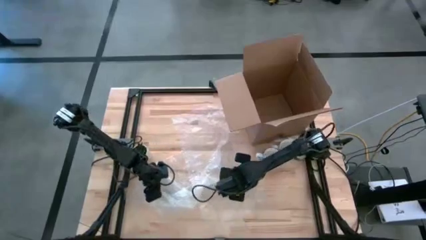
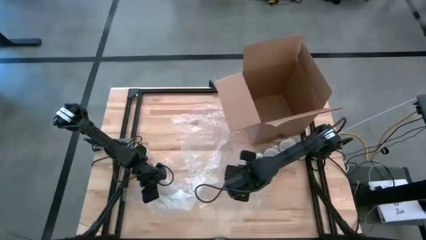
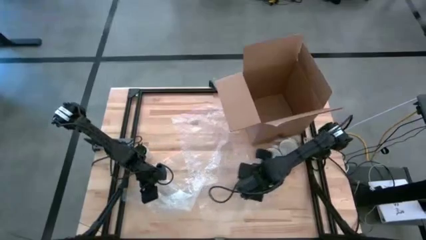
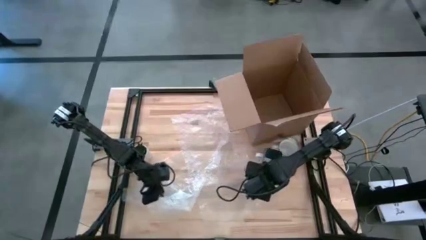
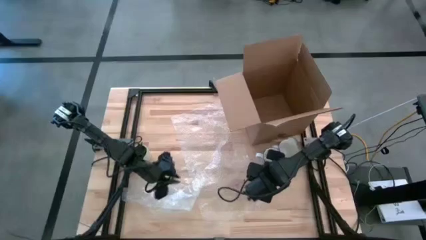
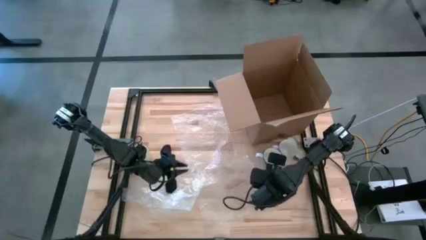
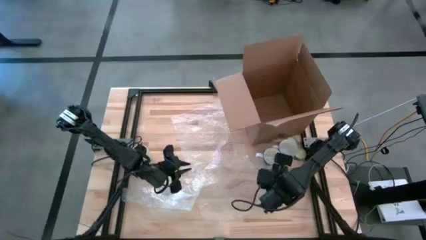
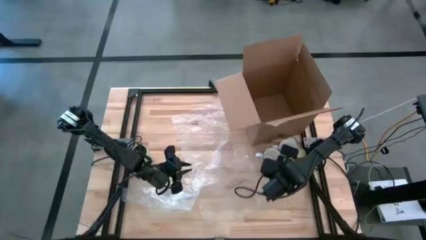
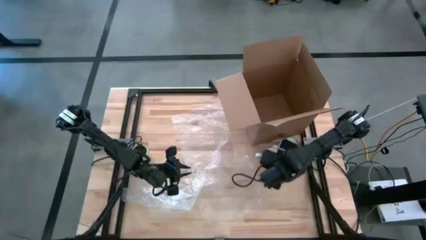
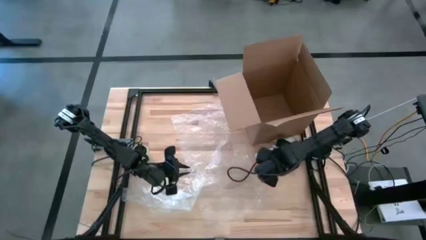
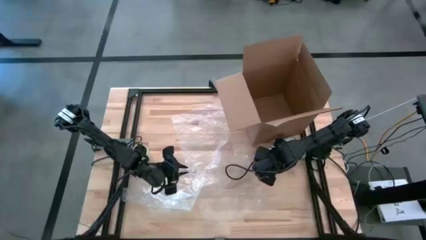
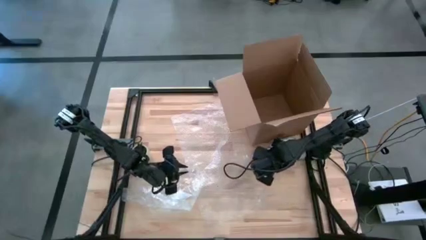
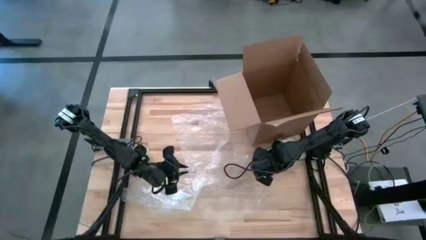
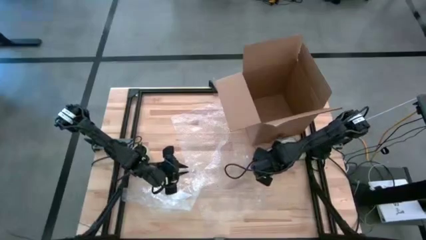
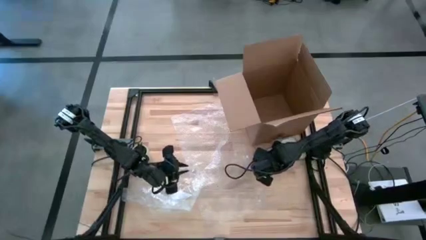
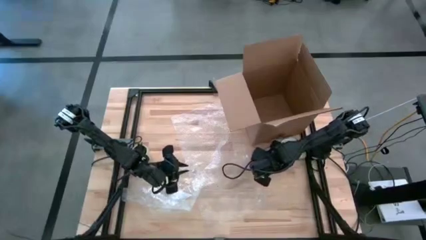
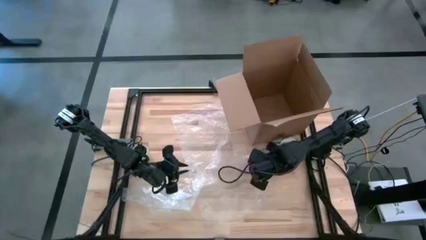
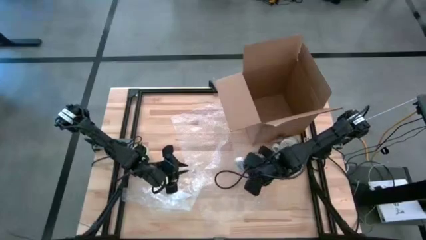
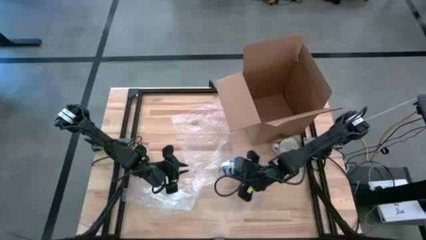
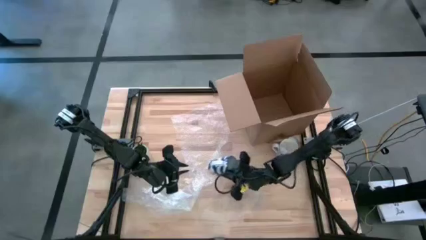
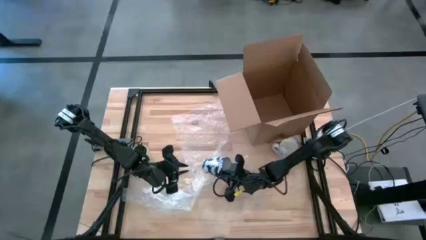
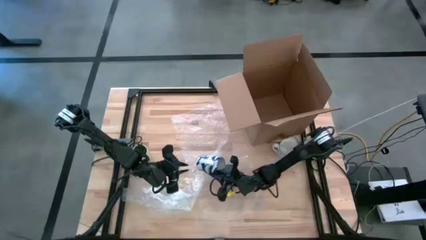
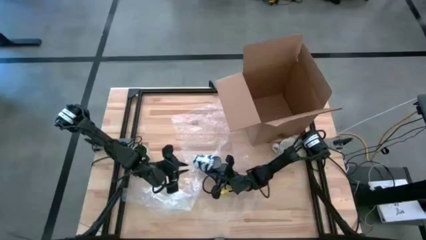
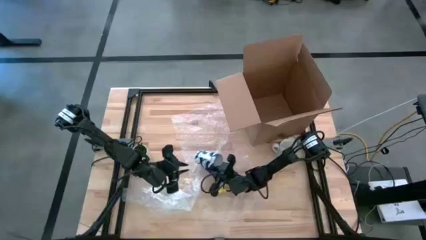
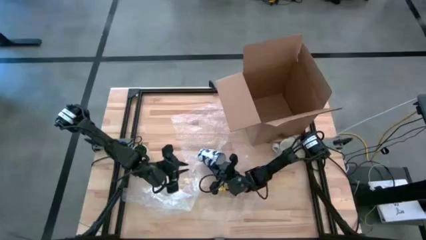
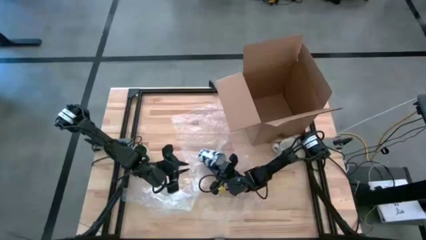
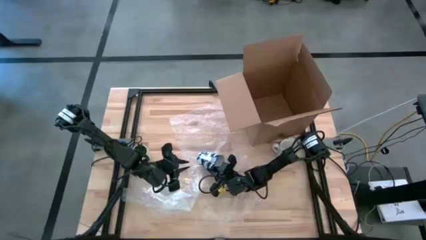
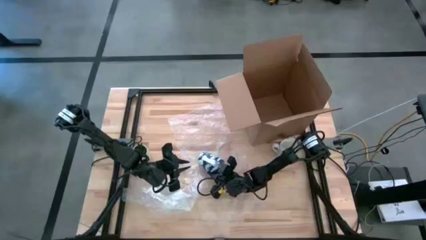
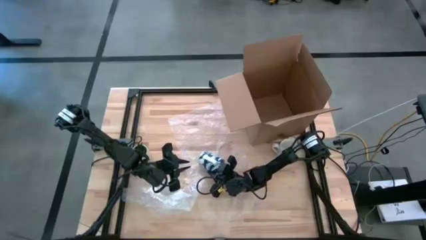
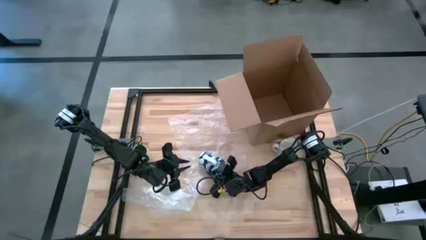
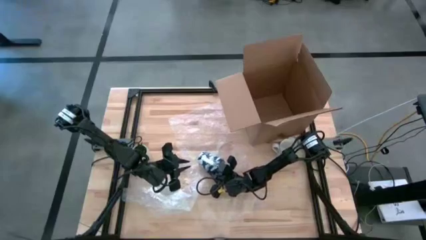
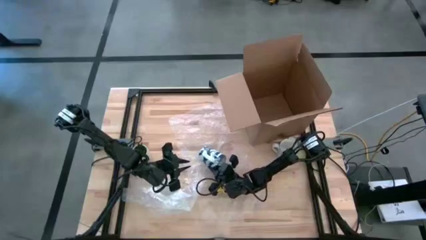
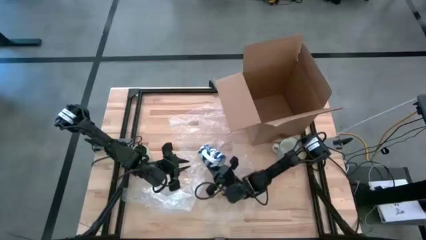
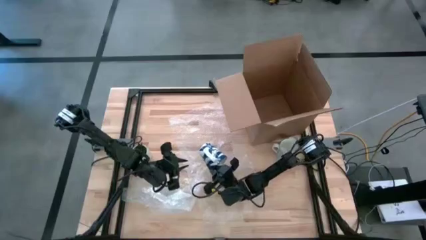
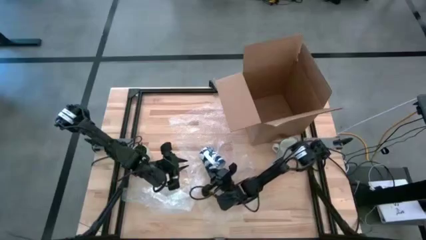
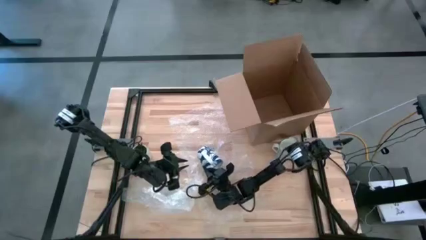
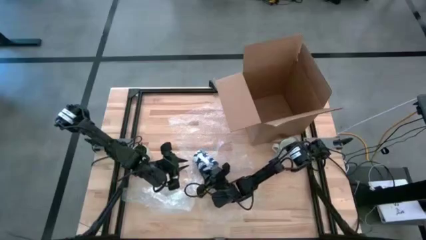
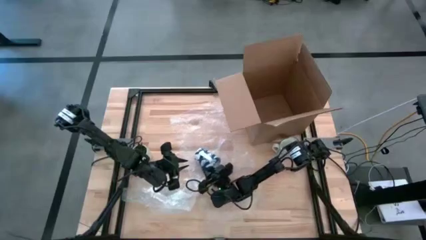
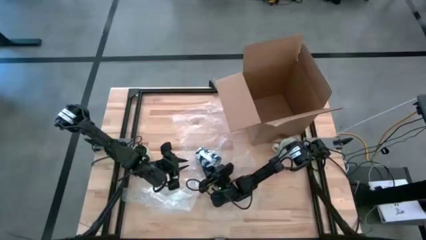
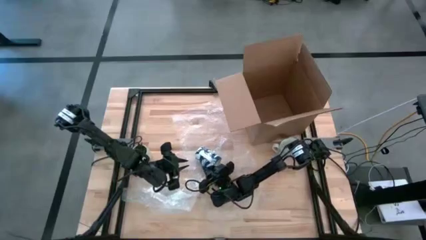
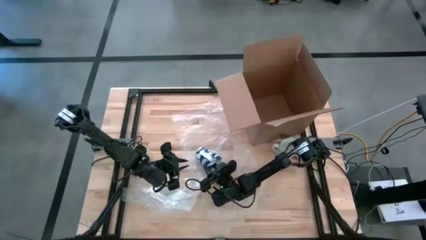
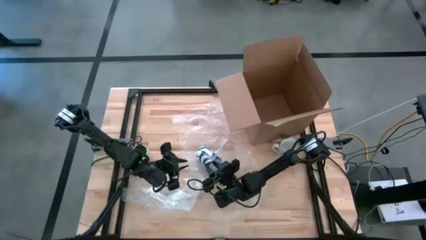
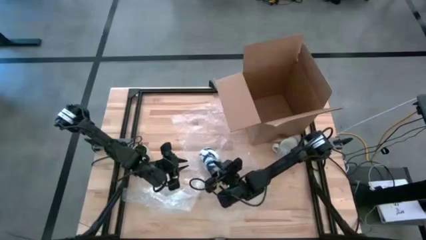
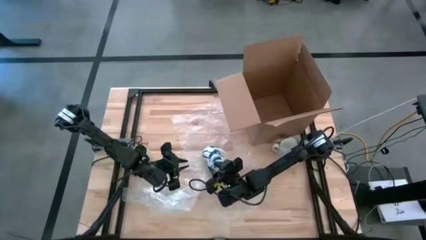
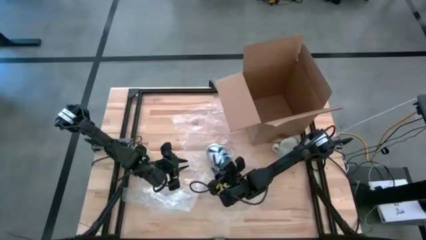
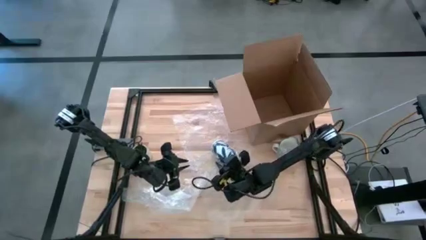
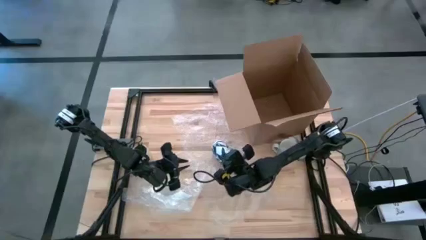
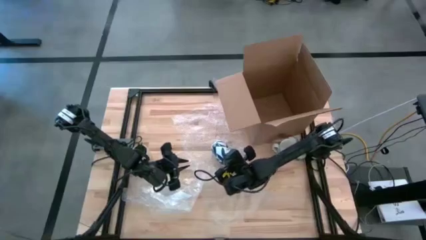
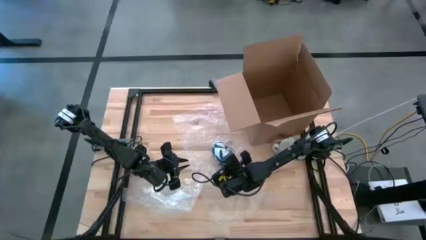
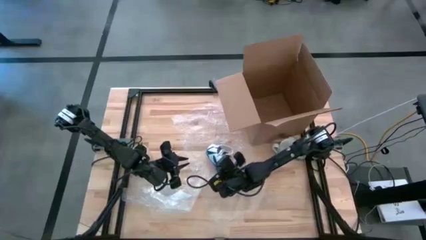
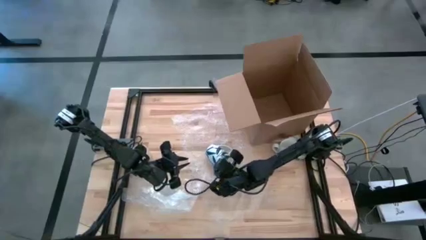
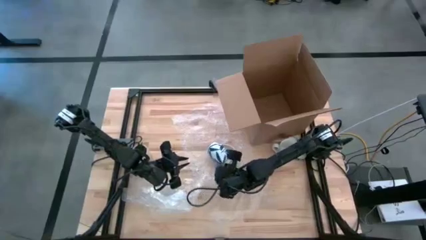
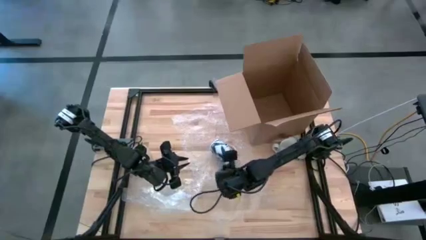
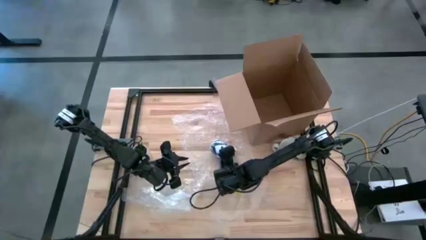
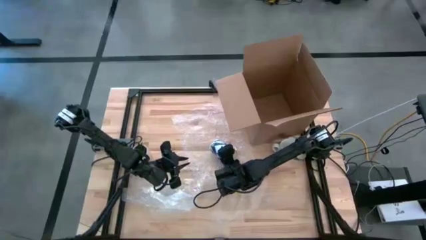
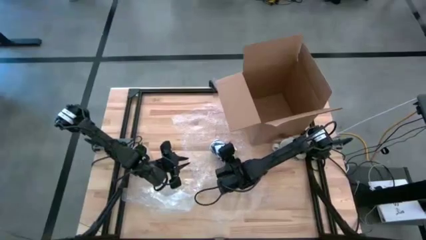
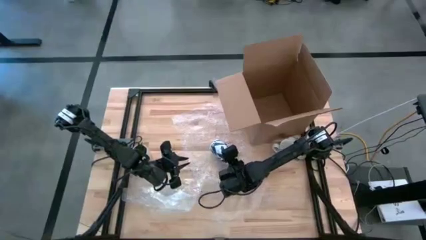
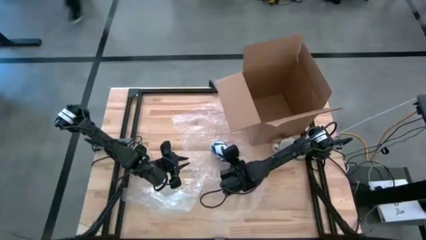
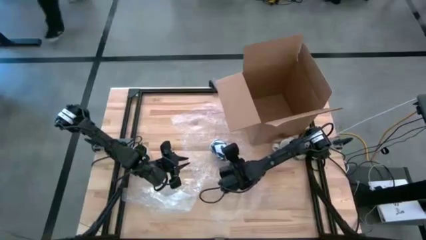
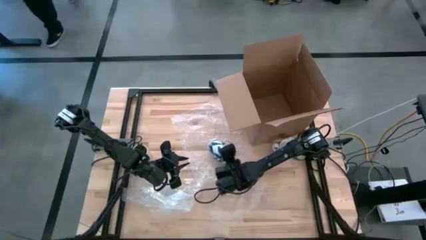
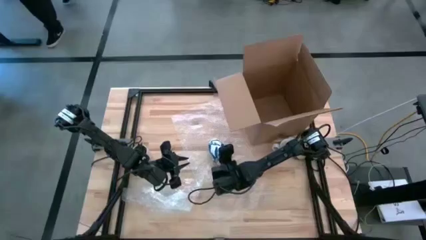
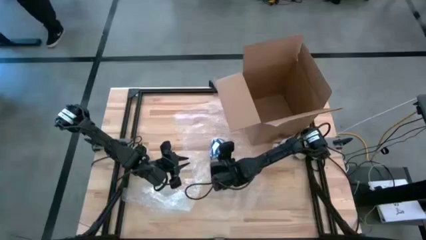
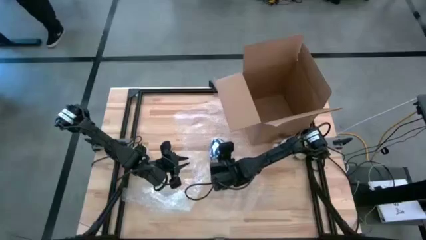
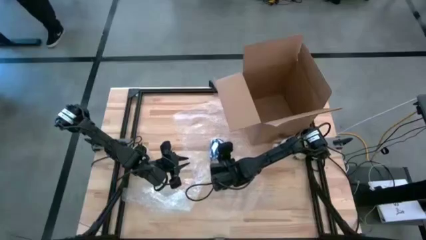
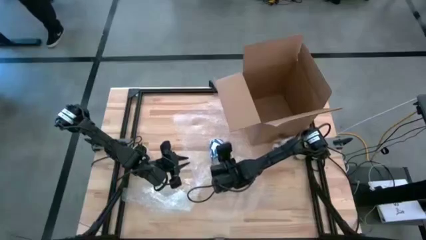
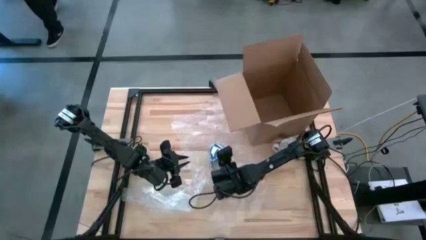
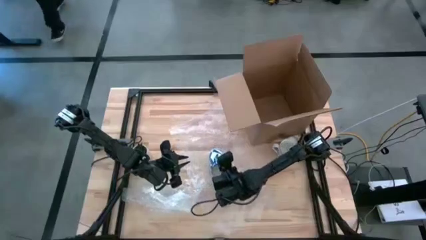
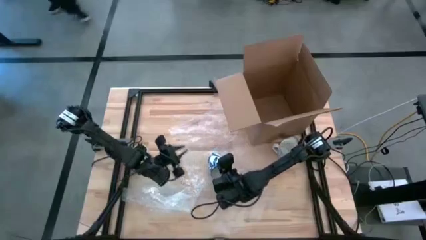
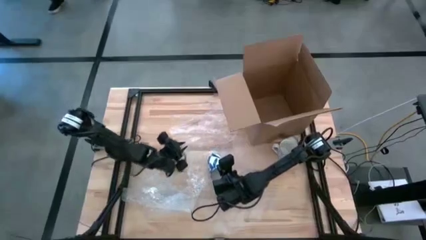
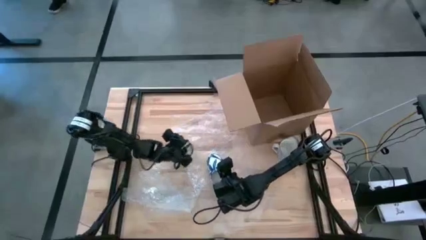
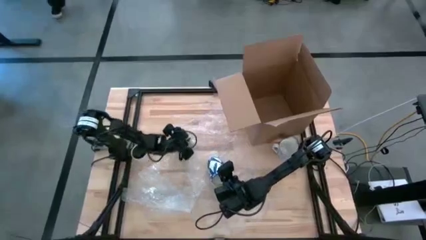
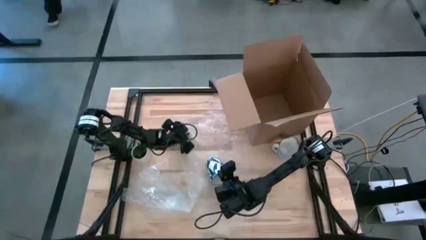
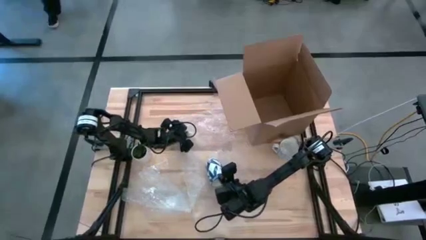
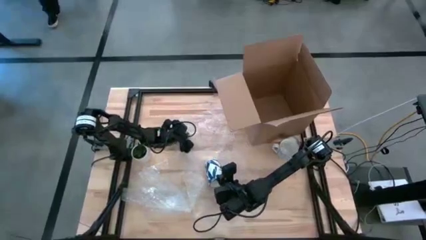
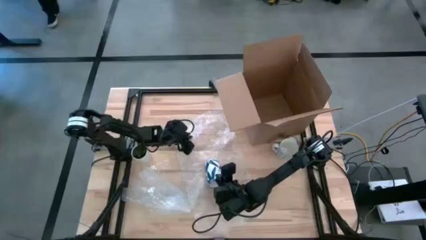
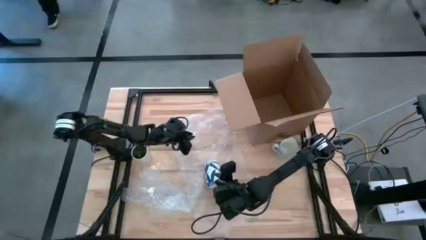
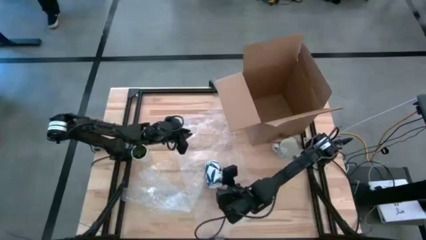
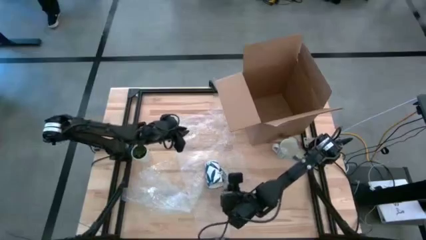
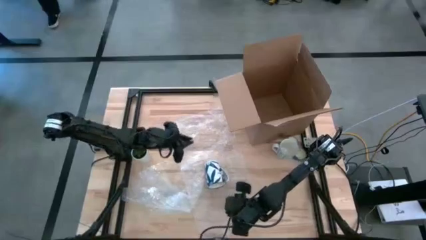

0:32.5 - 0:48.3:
Task: wrap mug
Wrap the blue mug with the right bubble wrap

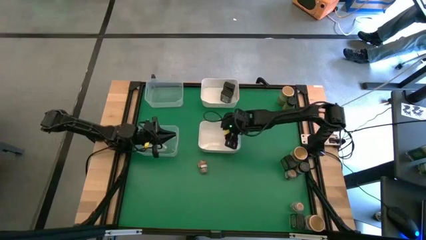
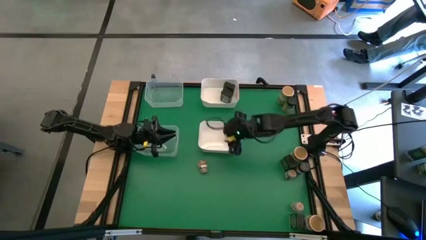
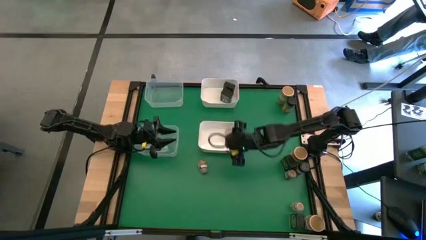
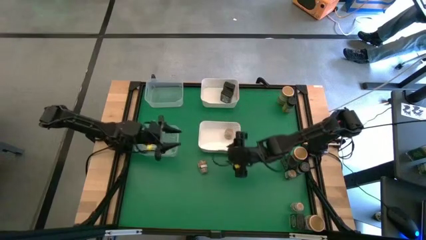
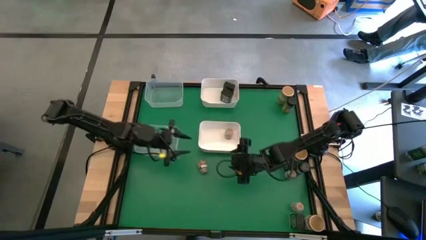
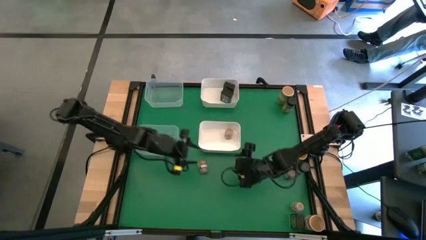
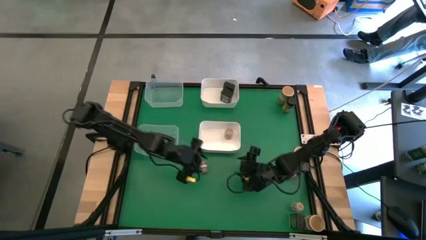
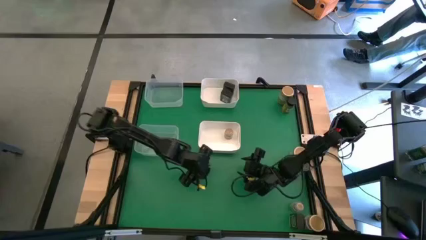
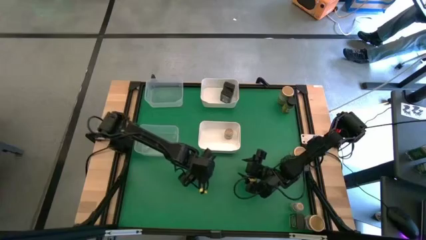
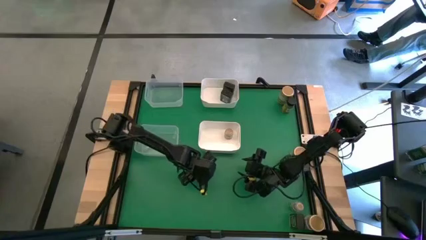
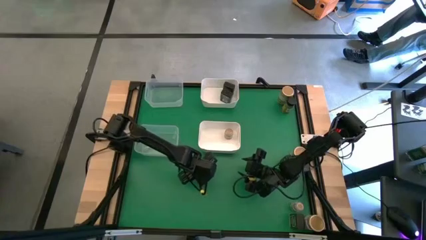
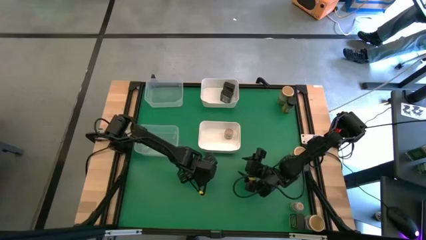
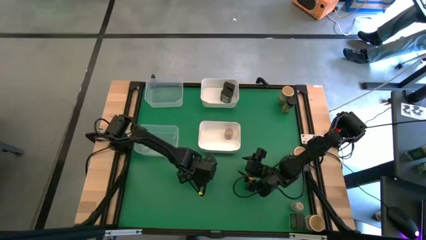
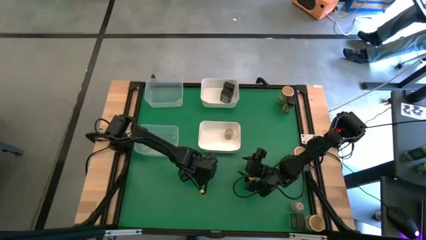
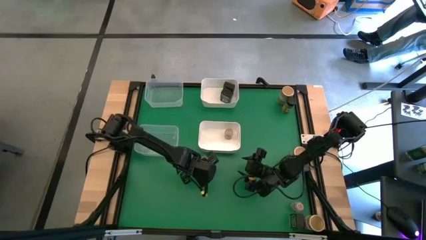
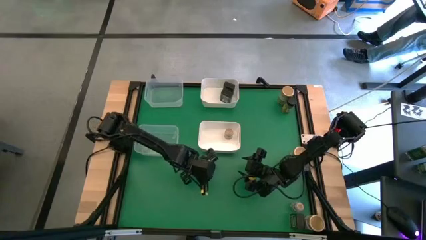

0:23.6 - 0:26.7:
Task: Sort spices by type
Put the top left brown seasoning bottle into the bottom white bin
